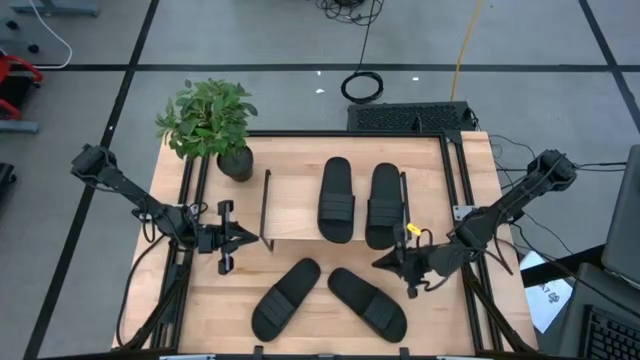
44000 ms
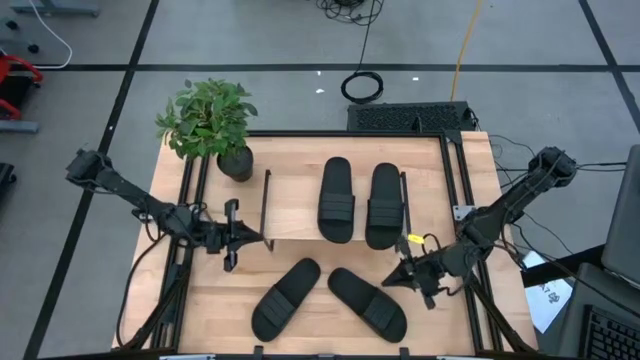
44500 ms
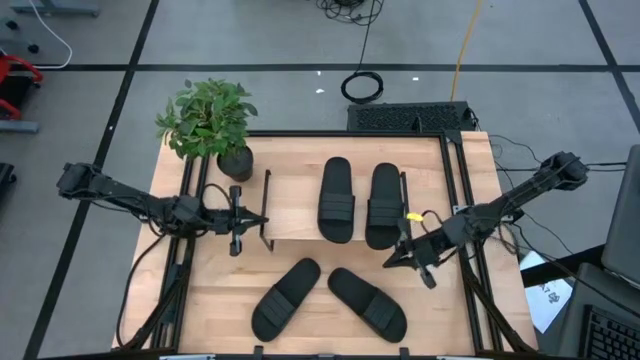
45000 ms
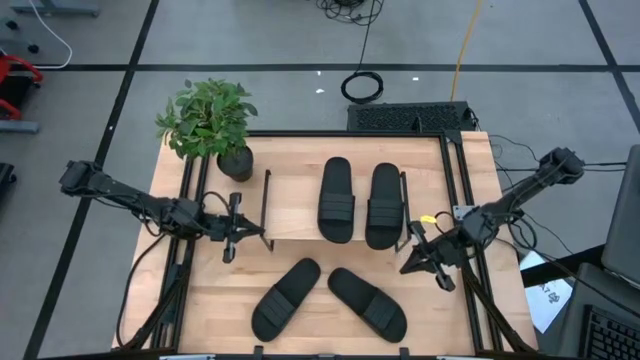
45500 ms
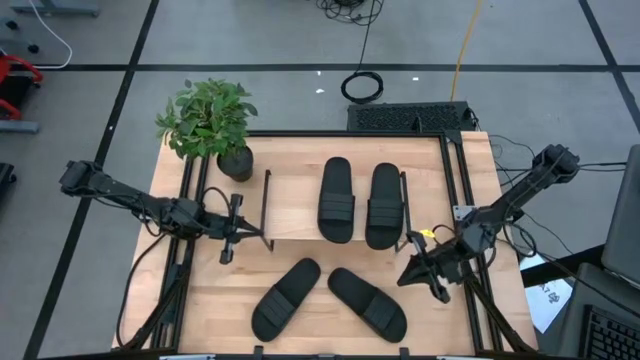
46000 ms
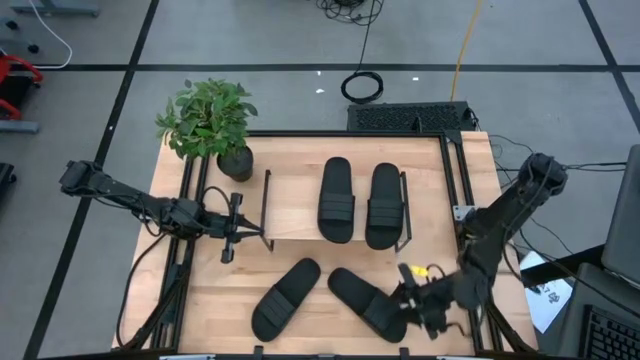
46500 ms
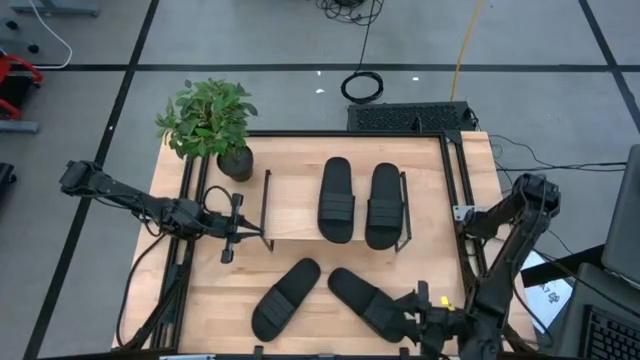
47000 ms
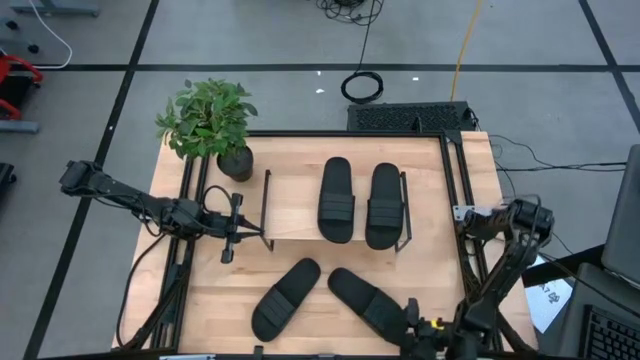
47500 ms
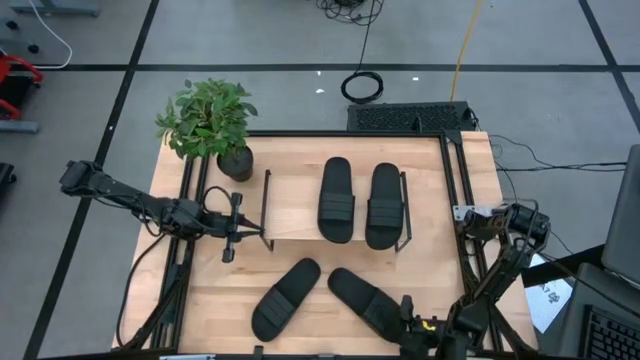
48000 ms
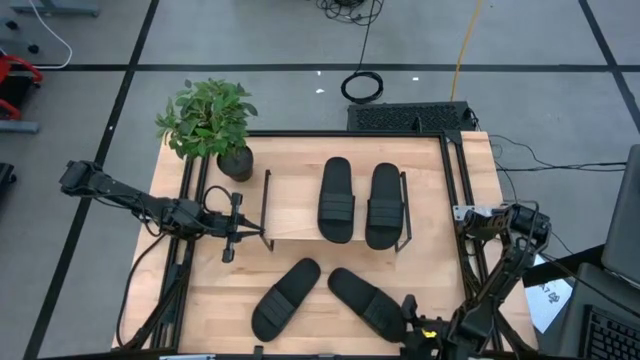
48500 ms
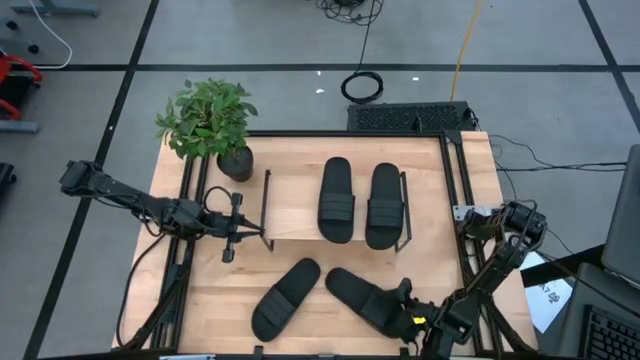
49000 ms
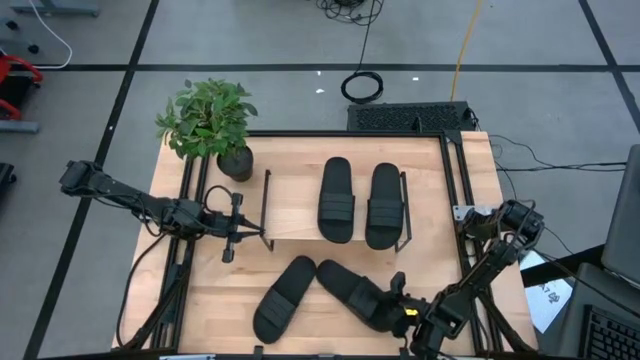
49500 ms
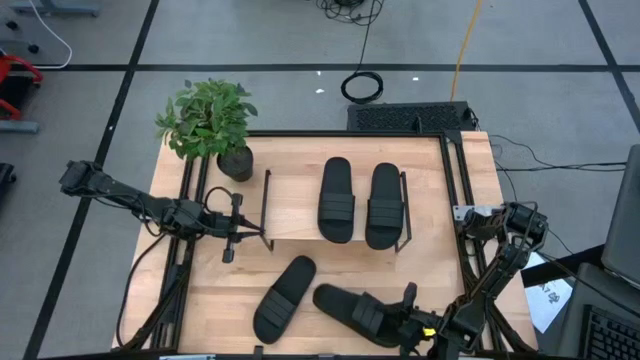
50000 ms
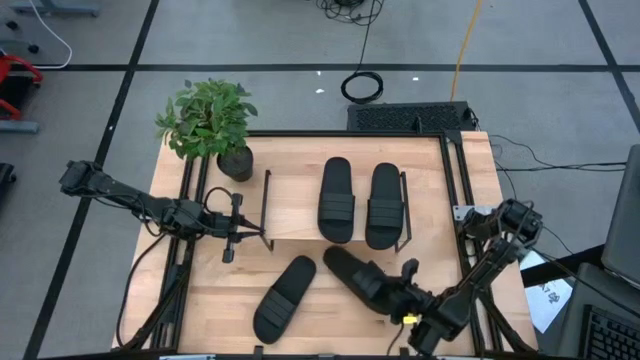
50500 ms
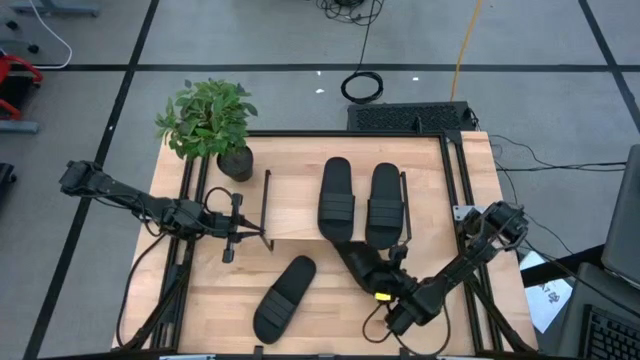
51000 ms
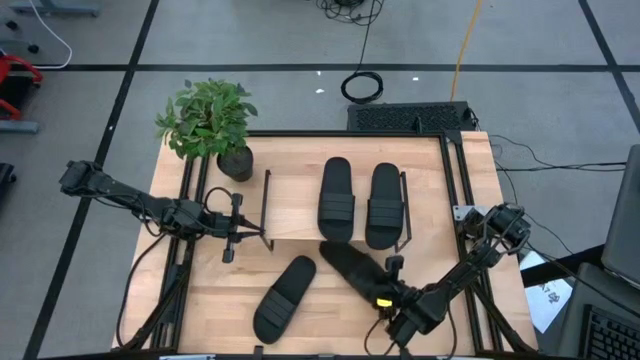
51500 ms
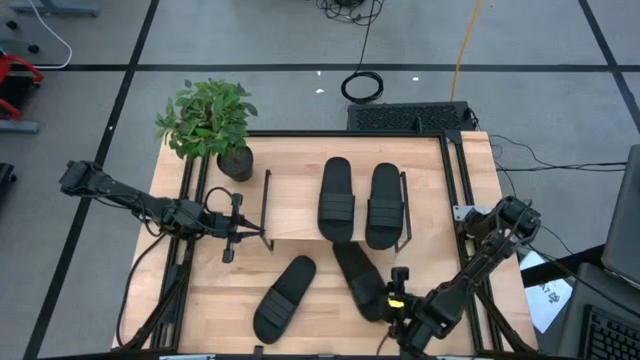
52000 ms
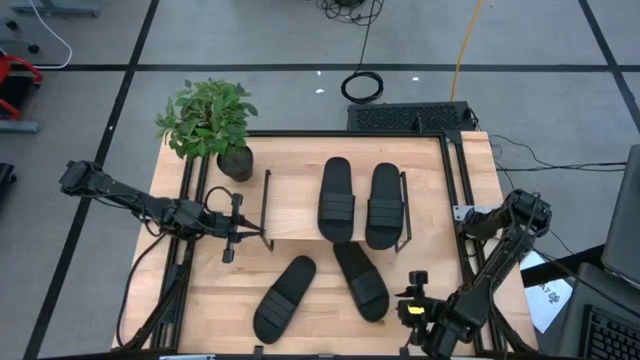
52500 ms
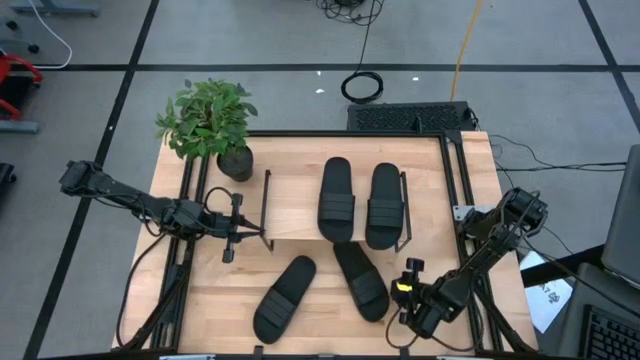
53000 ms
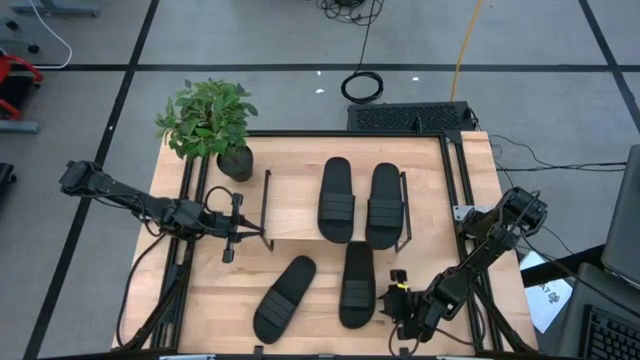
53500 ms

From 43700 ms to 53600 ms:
Task: Pick and place slides into the shelf
Put the black slipper under the shelf

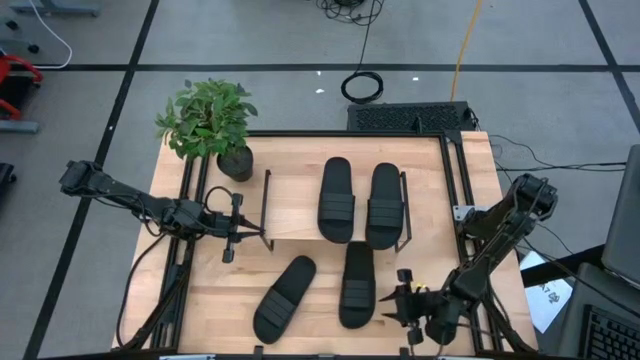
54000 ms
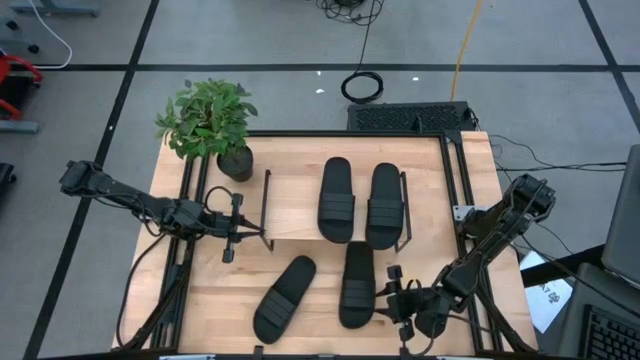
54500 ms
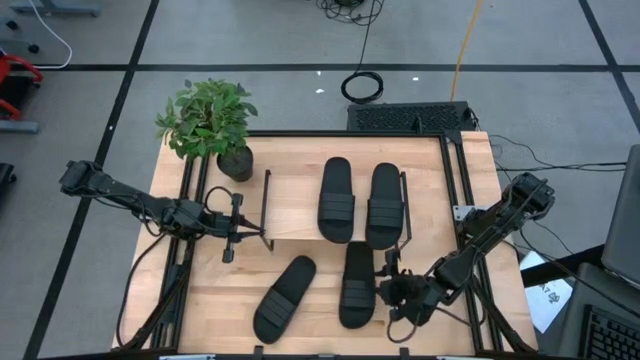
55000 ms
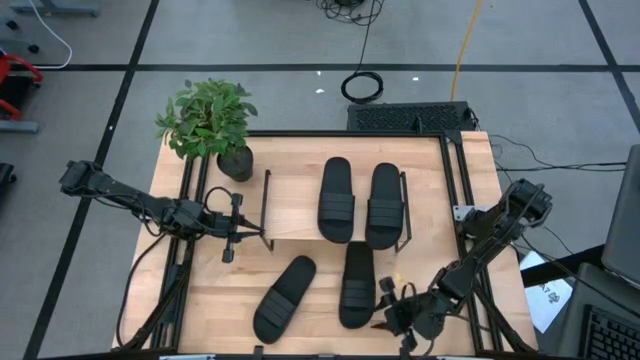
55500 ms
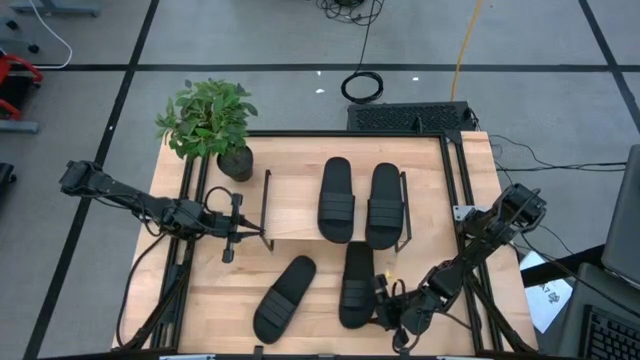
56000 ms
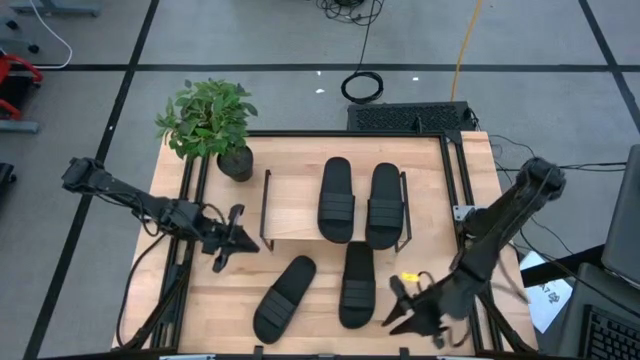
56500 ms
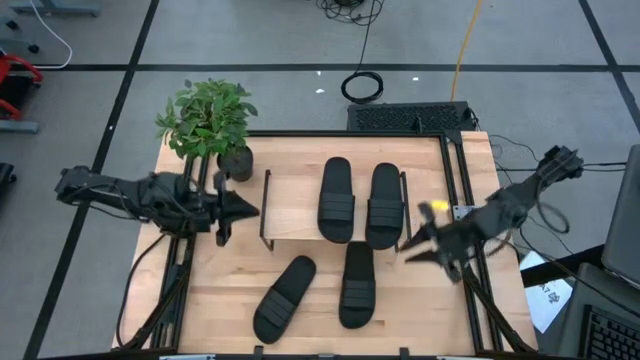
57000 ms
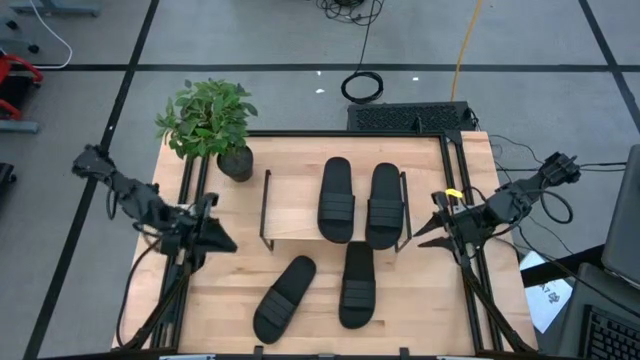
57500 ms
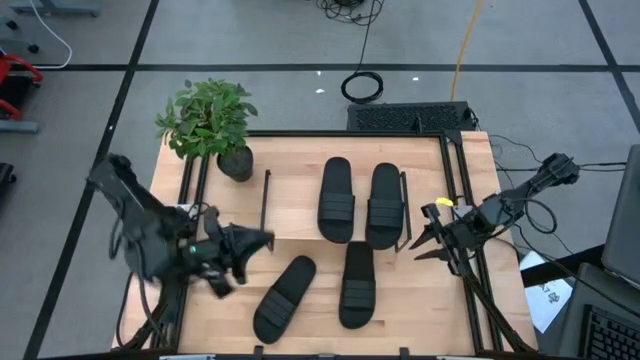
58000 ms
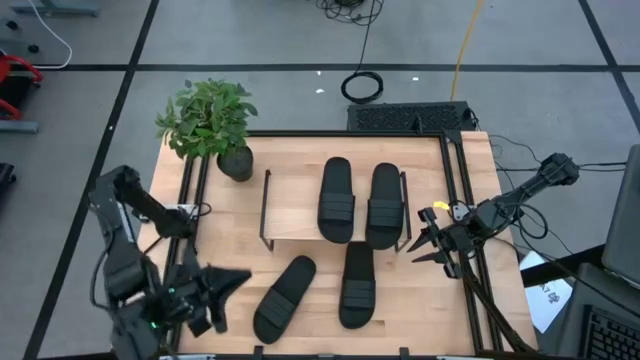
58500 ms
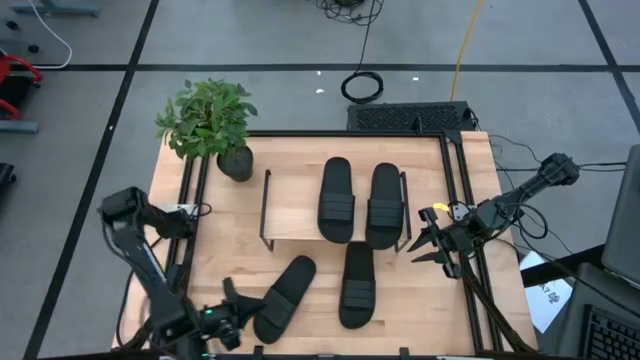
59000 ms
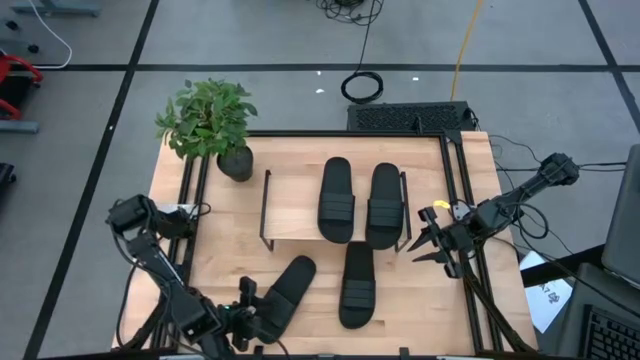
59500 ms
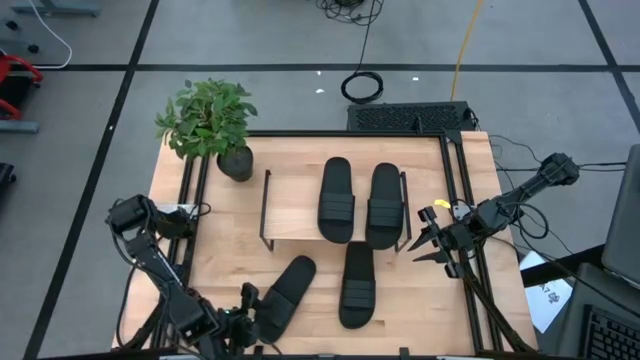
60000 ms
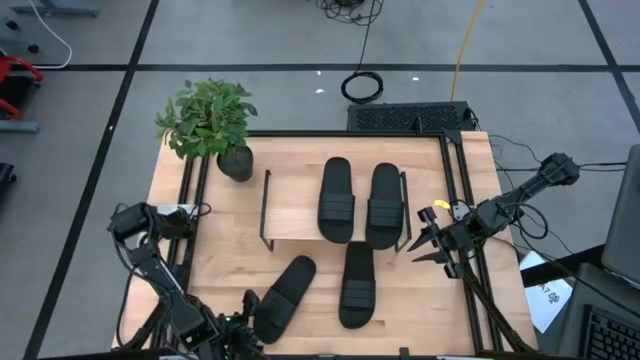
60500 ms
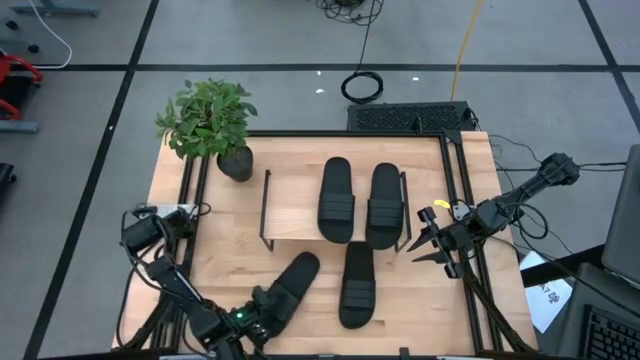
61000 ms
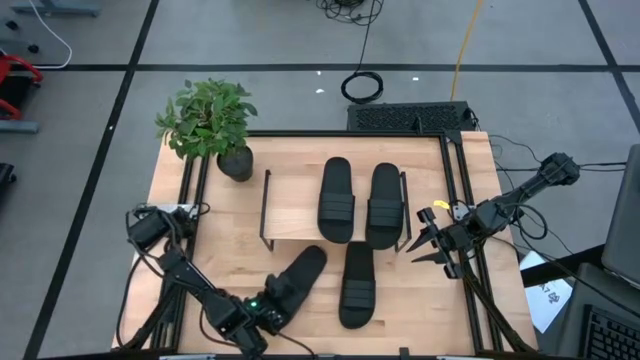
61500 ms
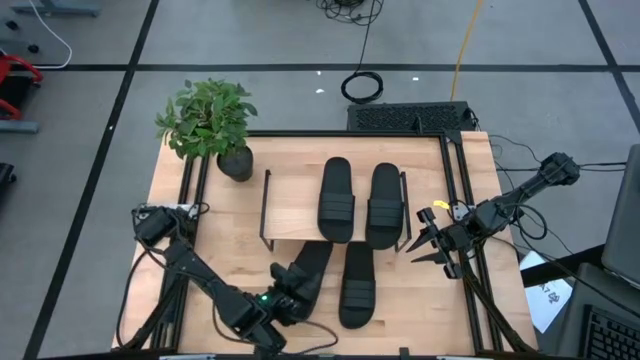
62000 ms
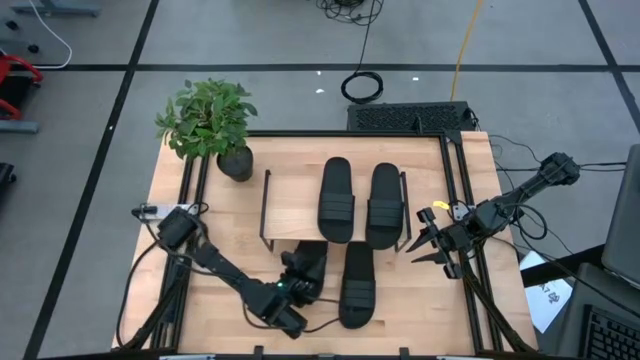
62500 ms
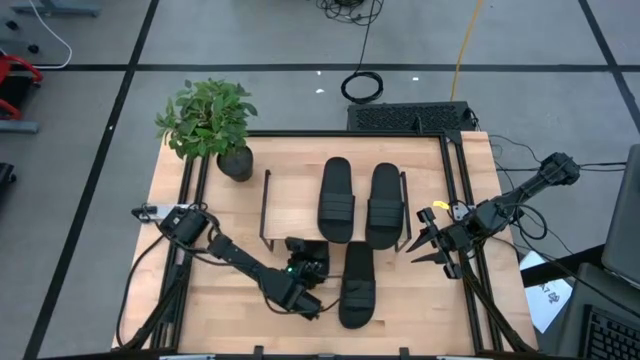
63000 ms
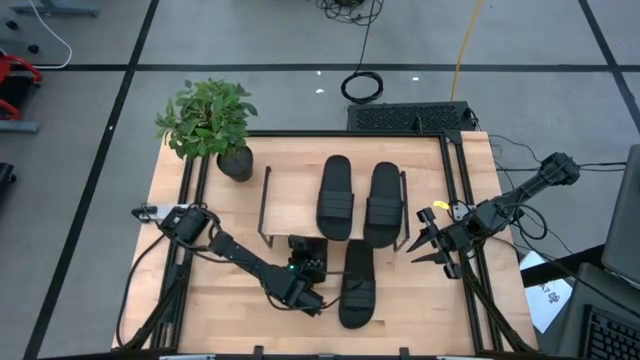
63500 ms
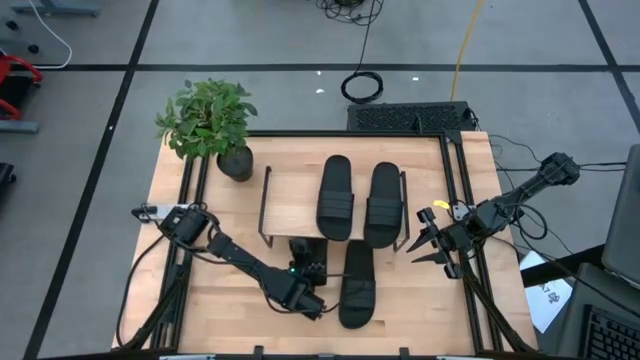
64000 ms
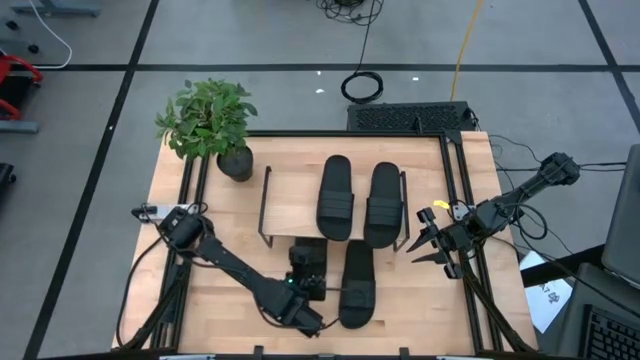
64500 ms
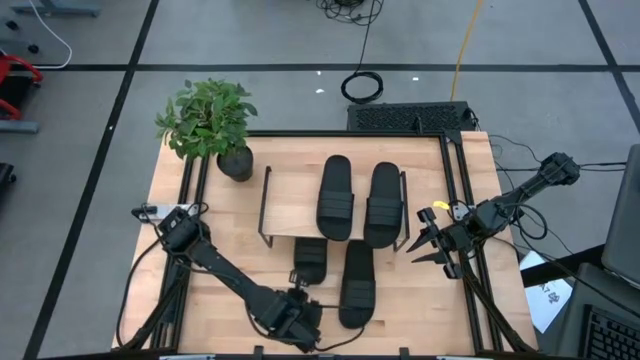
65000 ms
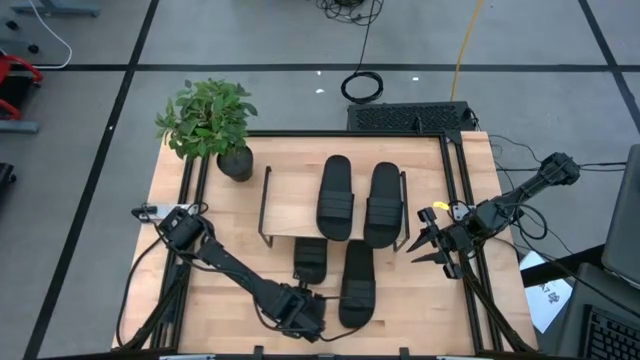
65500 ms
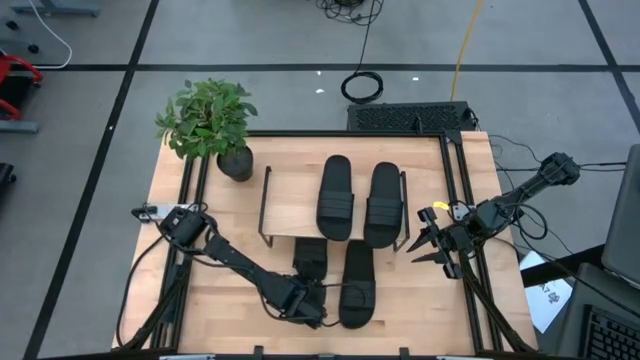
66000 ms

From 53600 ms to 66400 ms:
Put the black slipper under the shelf
